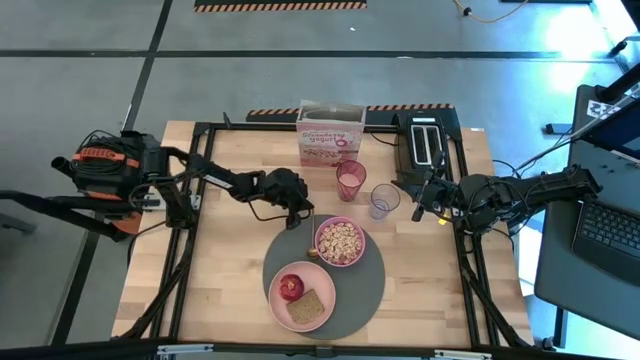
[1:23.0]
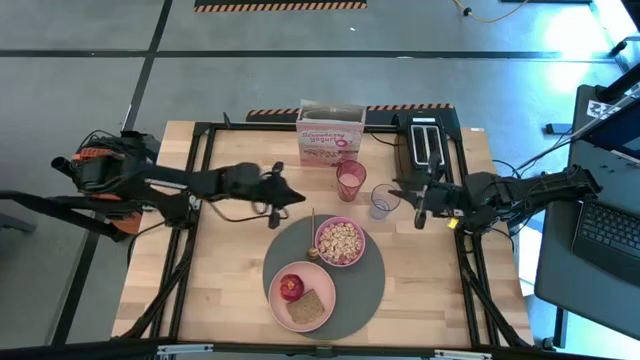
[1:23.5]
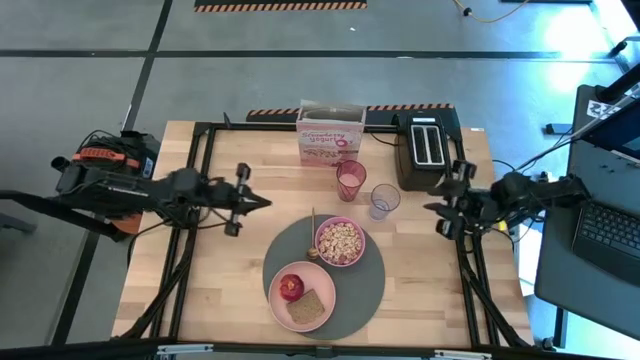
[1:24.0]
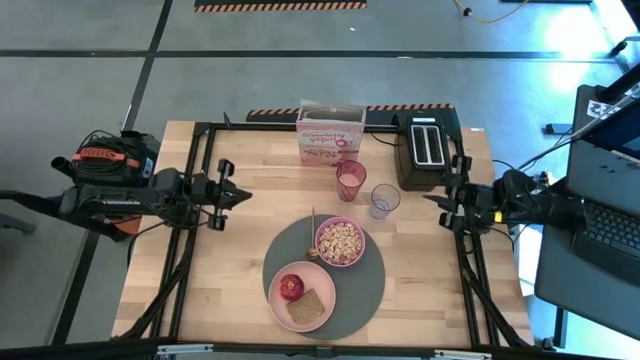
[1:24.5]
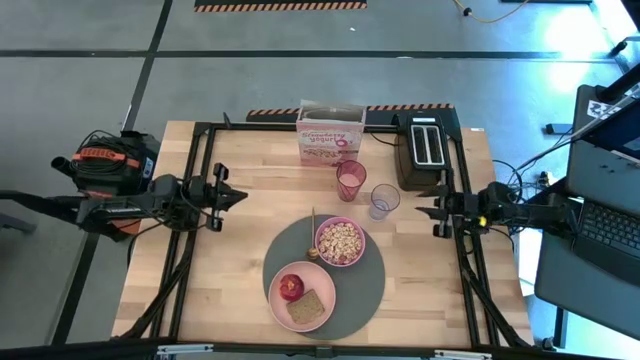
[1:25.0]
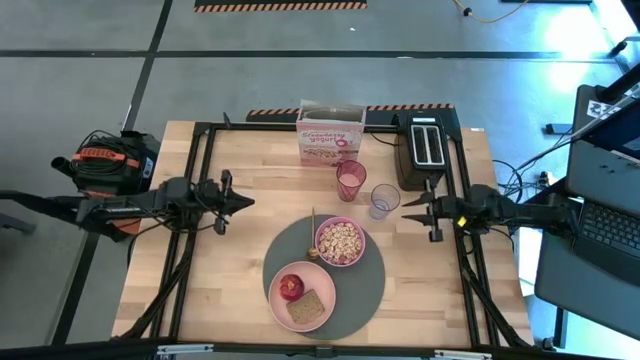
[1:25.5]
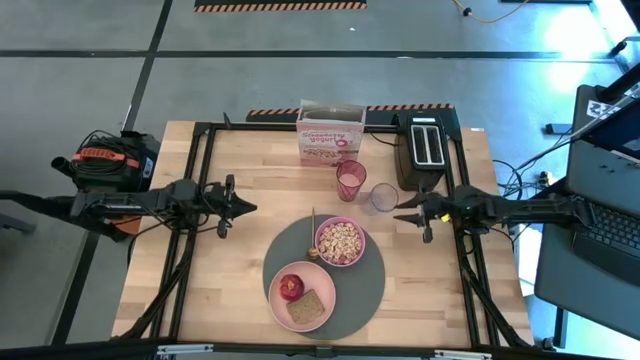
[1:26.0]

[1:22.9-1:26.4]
Task: Arrange a breakfast setting
Move the transparent cup to the right of the pink cup of milk

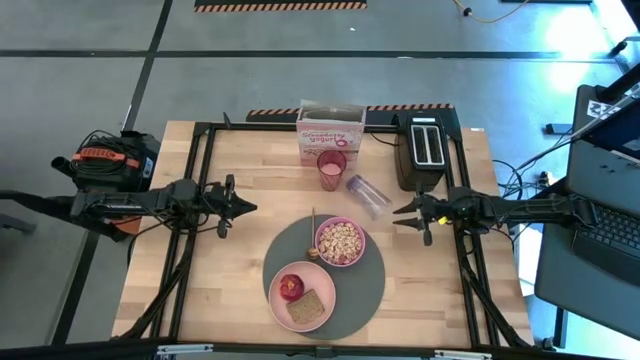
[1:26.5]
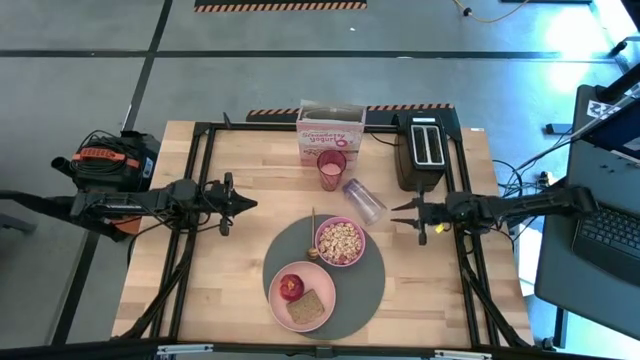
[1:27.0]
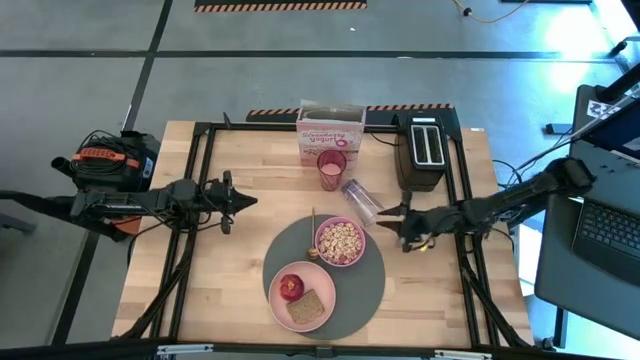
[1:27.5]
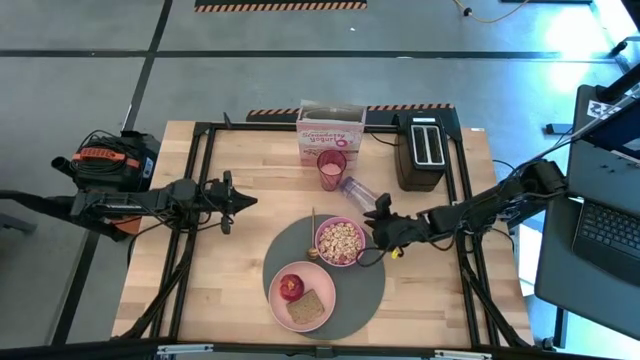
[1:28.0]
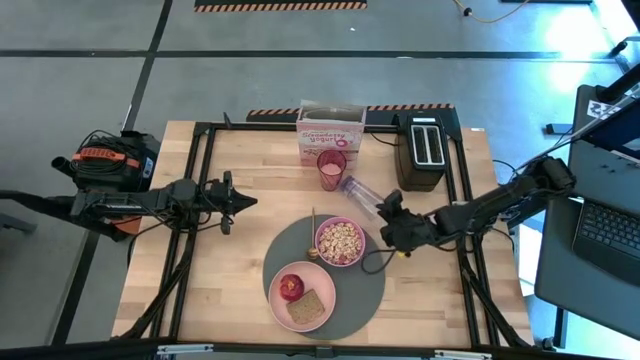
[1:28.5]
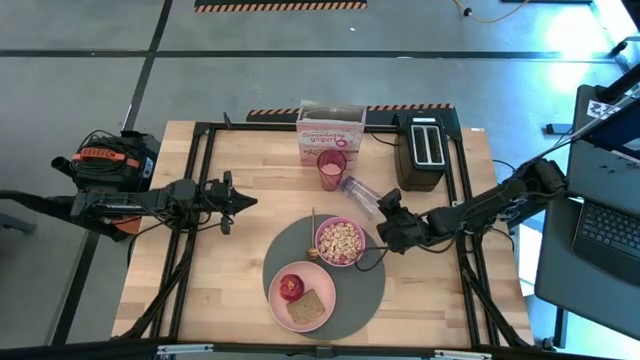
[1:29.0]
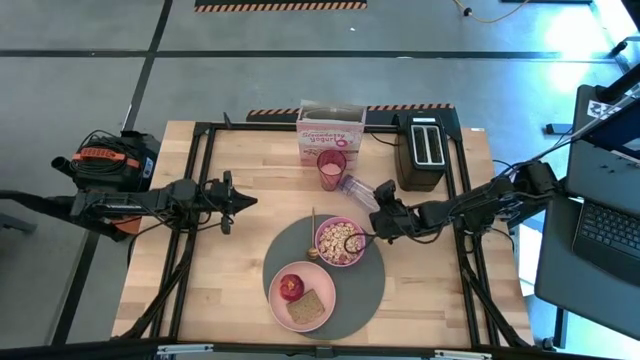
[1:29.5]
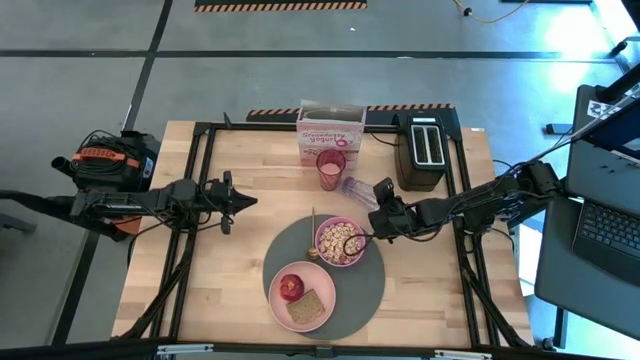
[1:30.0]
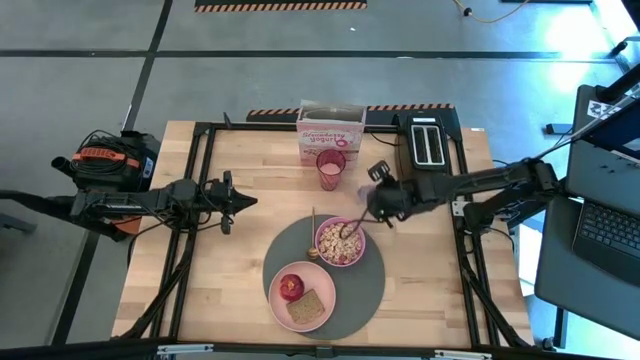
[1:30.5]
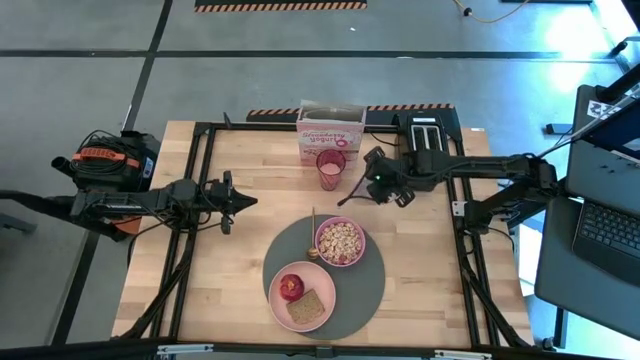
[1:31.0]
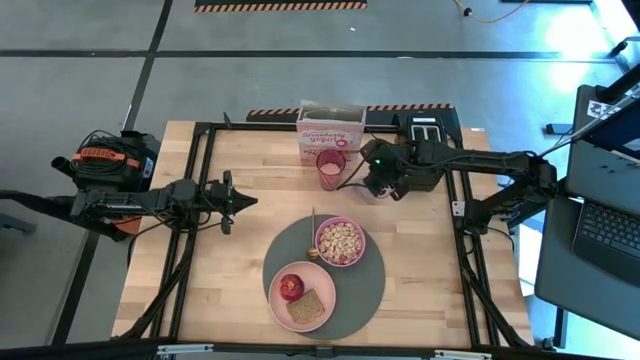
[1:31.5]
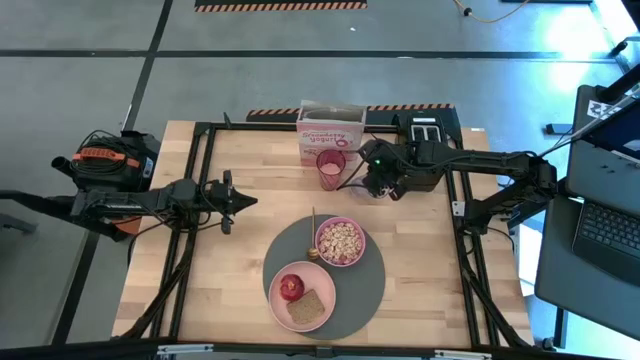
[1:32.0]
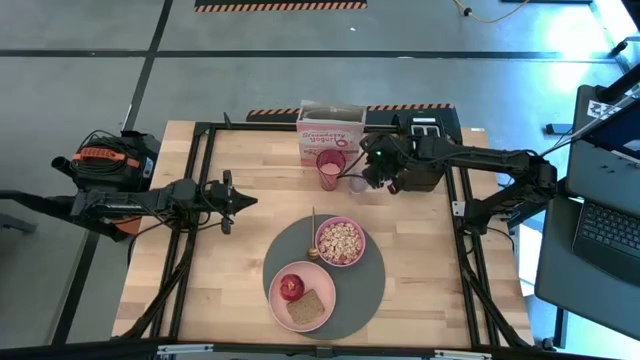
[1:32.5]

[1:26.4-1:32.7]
Move the transparent cup to the right of the pink cup of milk

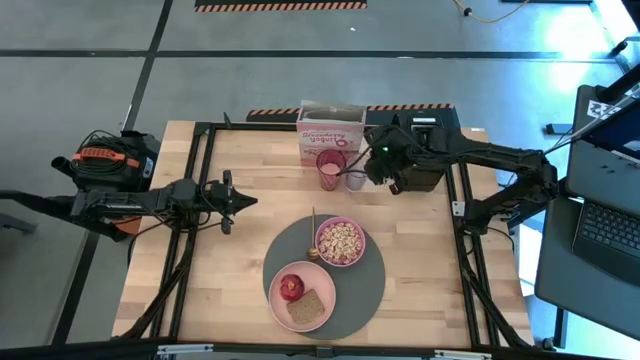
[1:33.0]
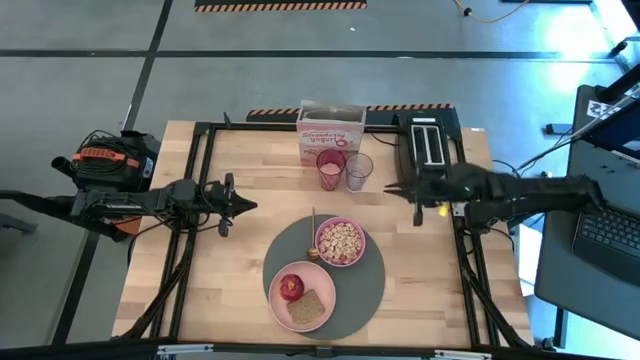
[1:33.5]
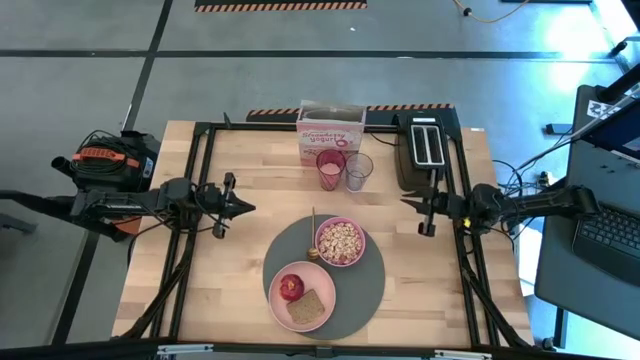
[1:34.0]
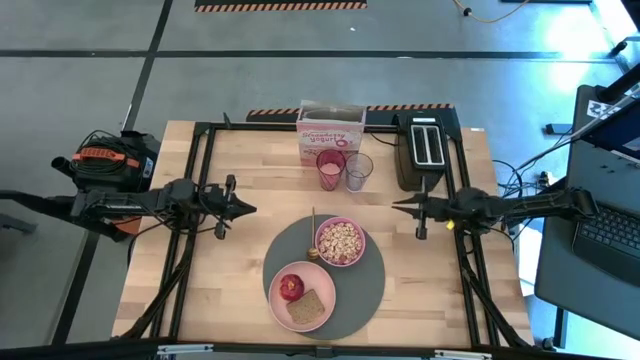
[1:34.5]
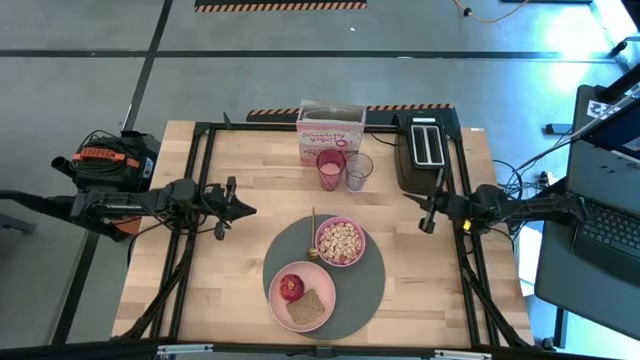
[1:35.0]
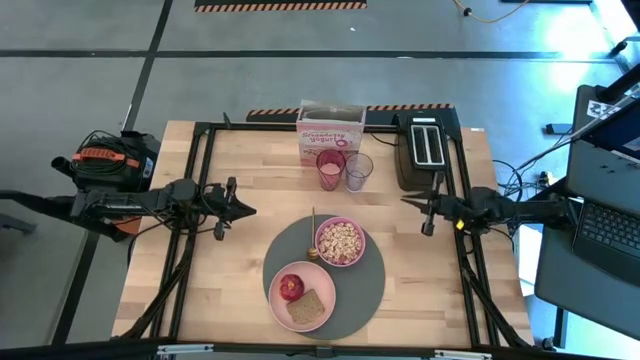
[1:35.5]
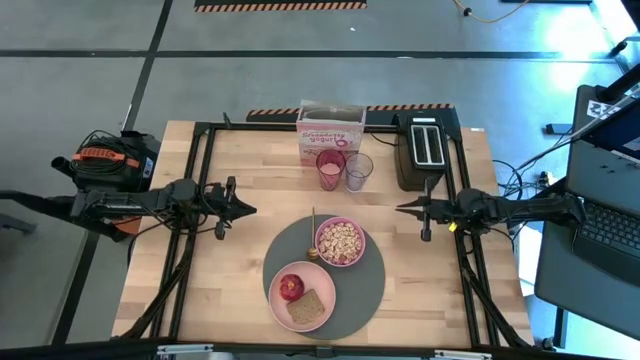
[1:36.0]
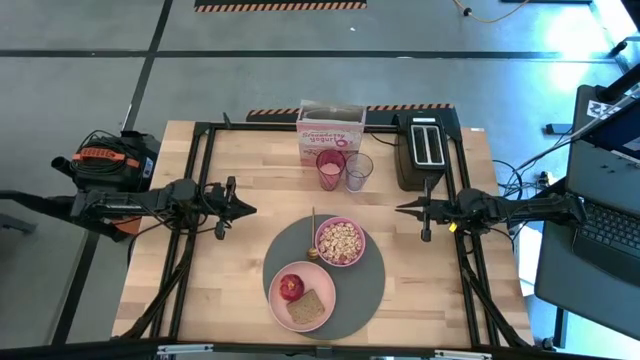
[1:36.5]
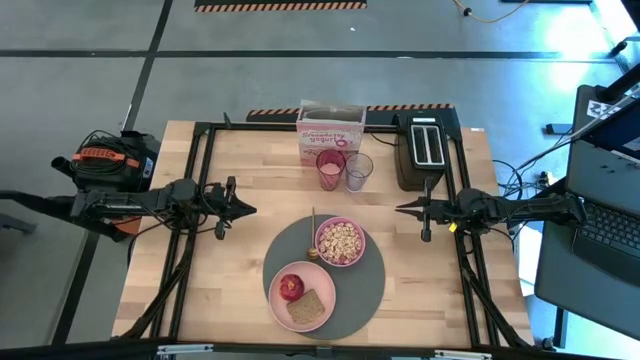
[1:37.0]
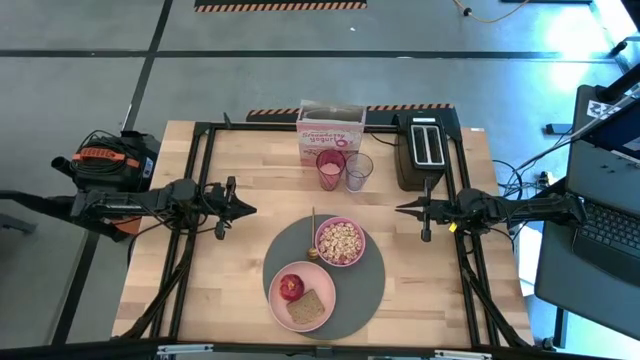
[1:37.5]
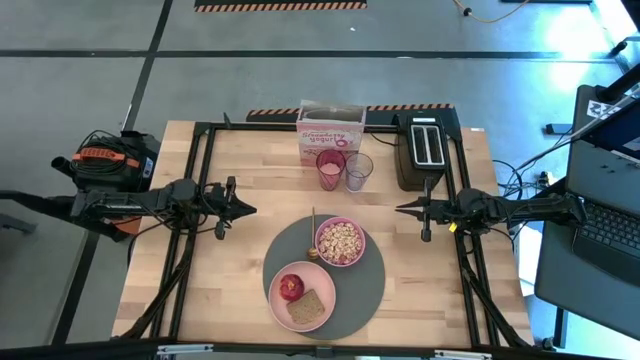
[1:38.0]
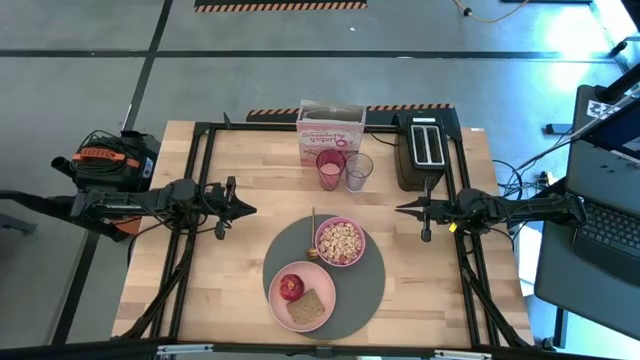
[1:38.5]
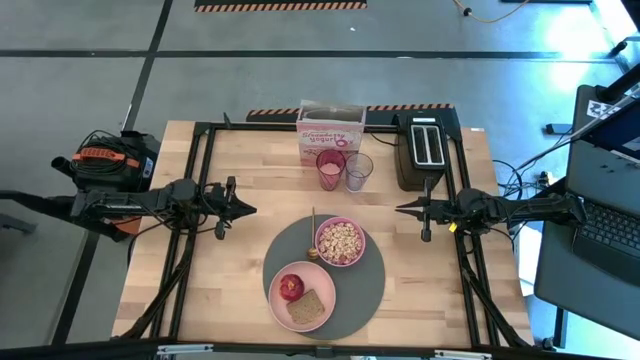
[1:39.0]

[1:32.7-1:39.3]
Return to Home Position

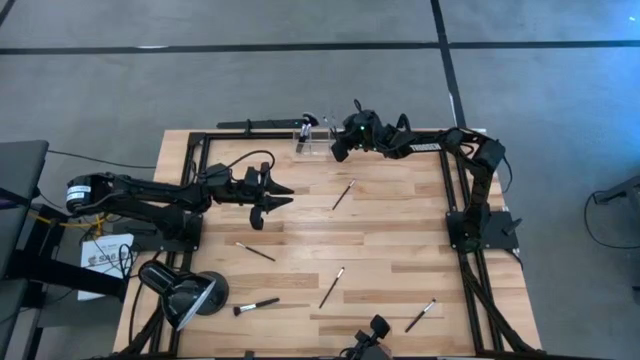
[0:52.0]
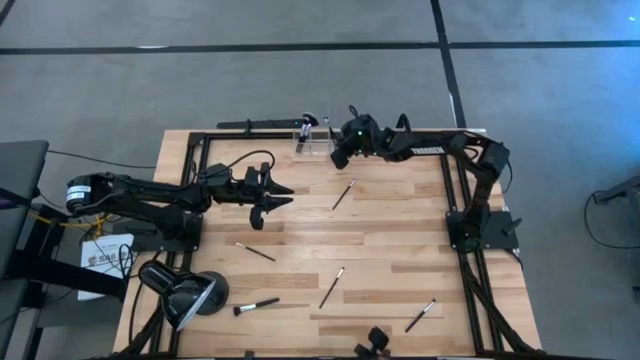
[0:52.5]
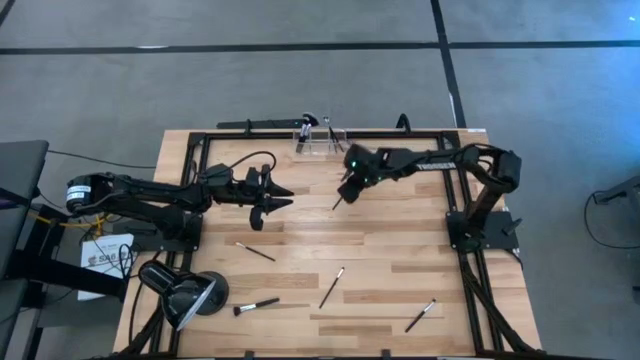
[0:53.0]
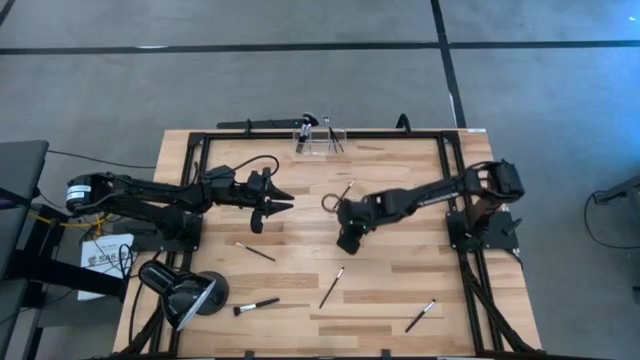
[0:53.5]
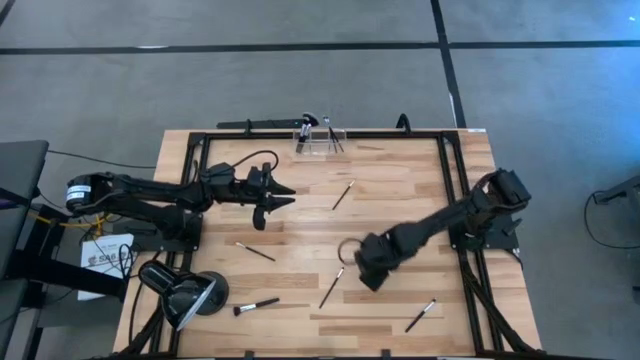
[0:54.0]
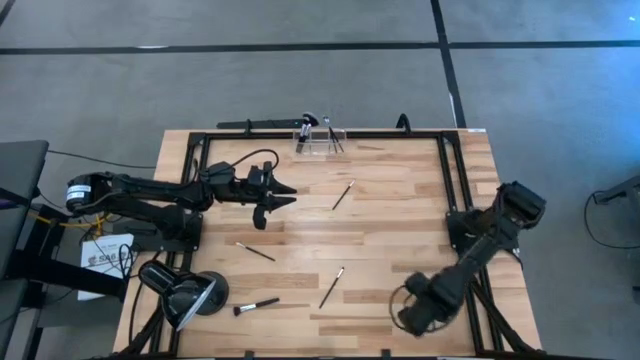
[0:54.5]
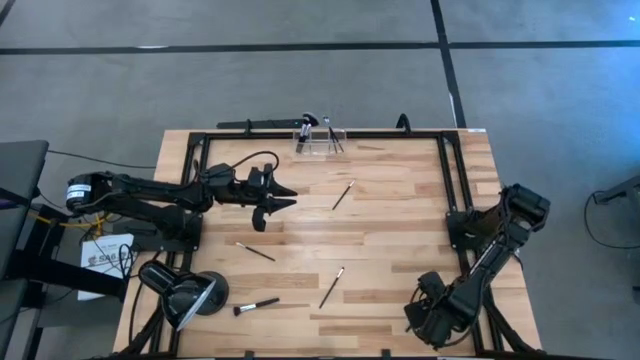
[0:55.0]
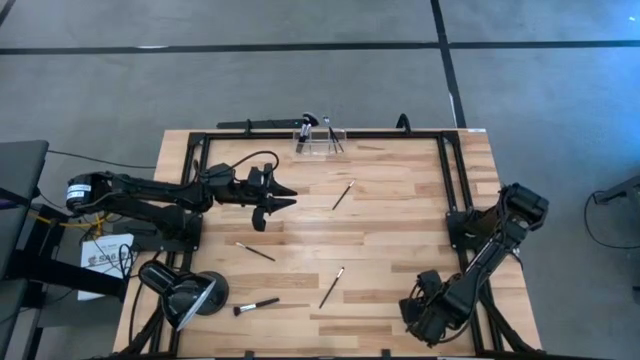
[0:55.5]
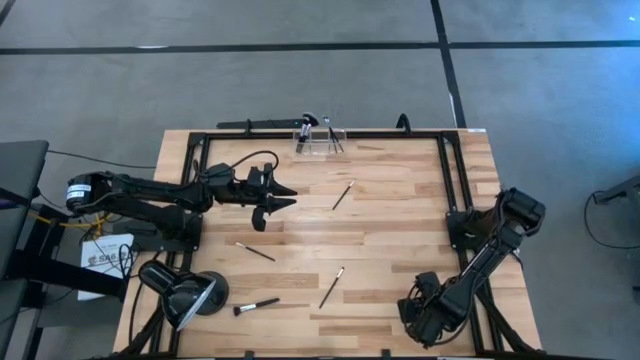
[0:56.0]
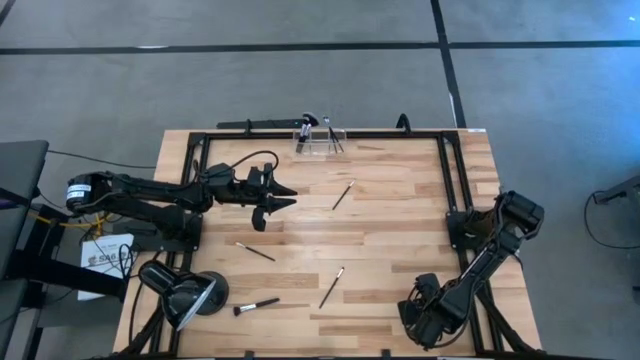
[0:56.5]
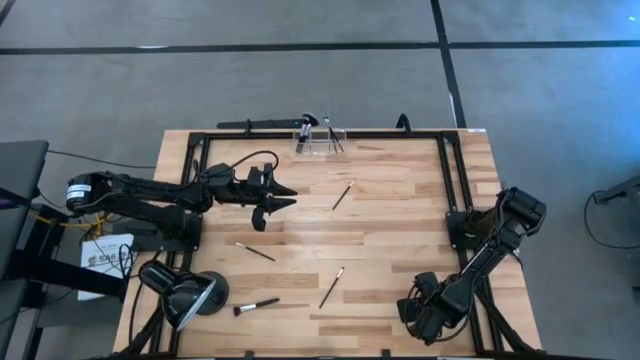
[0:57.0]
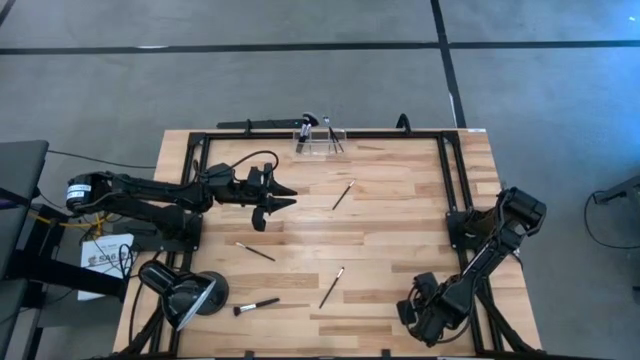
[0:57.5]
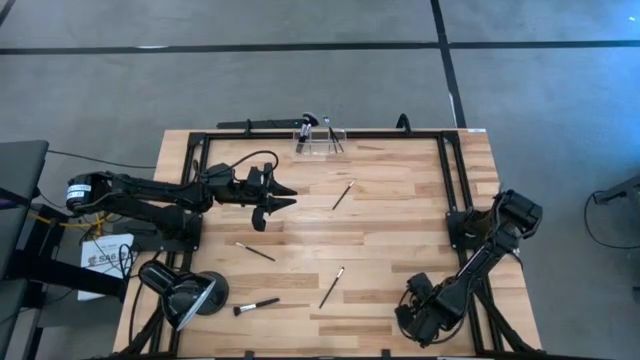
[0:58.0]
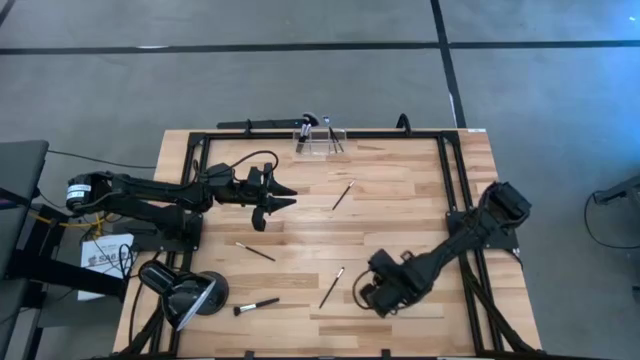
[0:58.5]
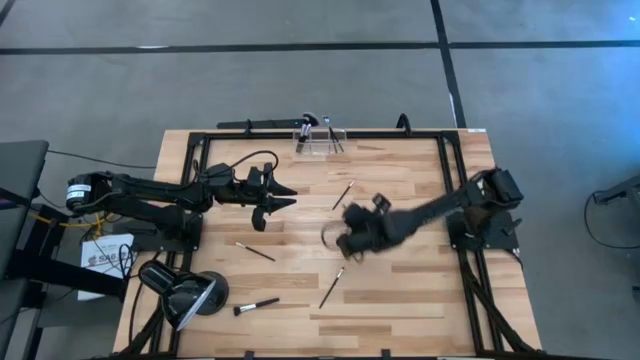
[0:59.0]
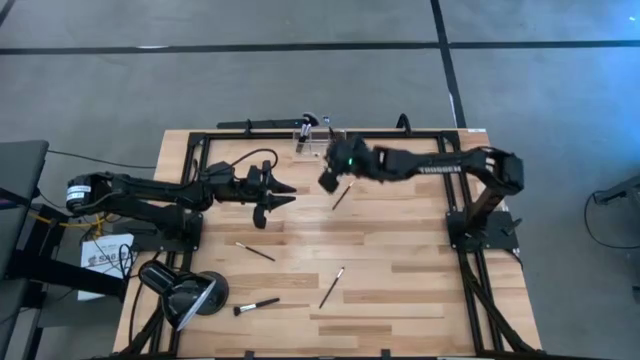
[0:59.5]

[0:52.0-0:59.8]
Task: Sort items
Put the eyeshadow brush into the right section of the transparent organizer
